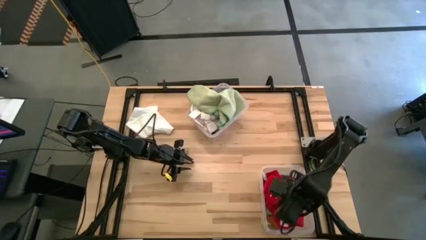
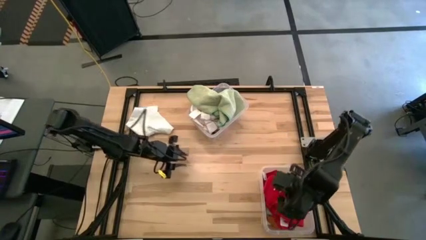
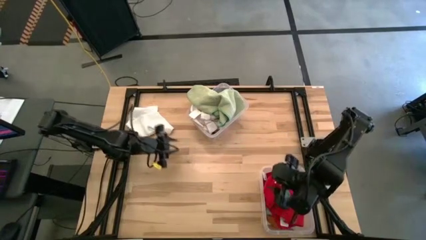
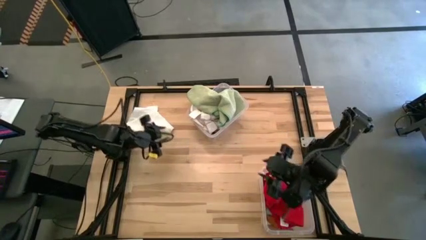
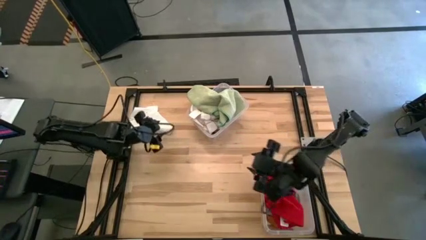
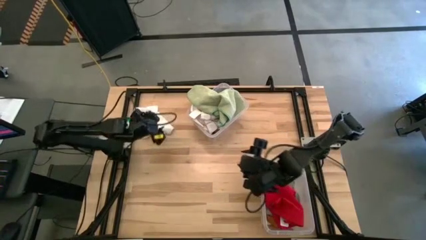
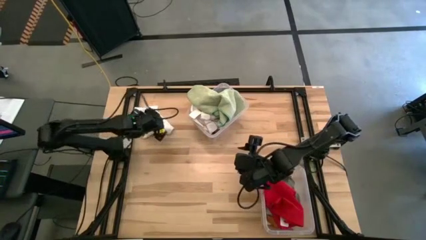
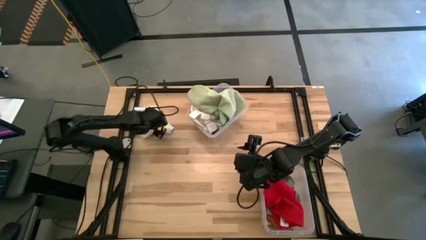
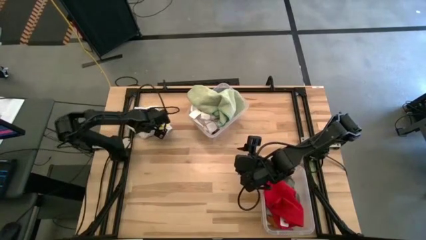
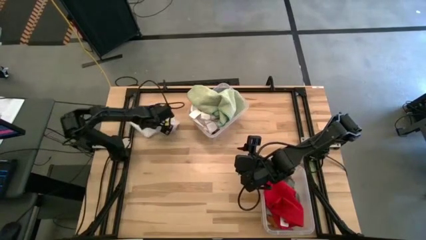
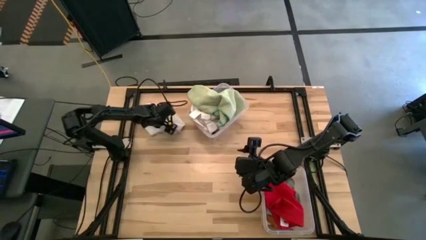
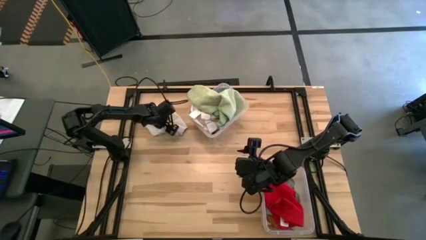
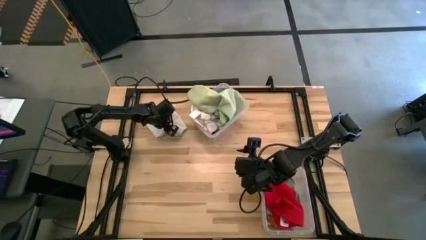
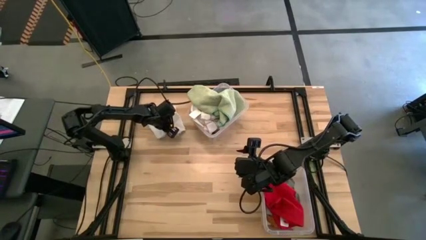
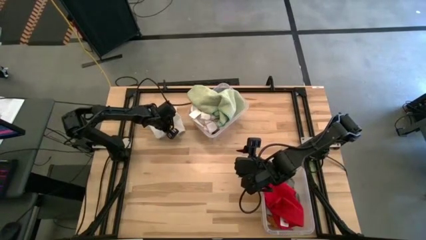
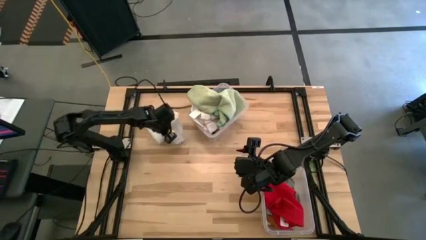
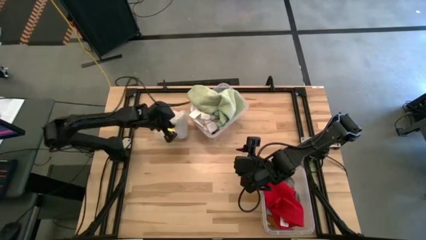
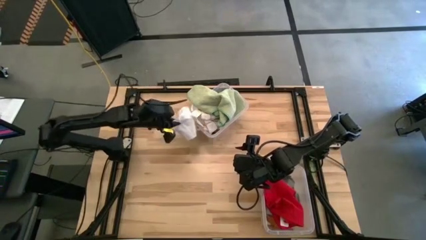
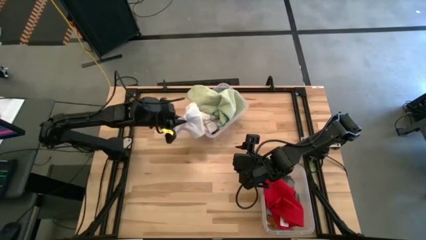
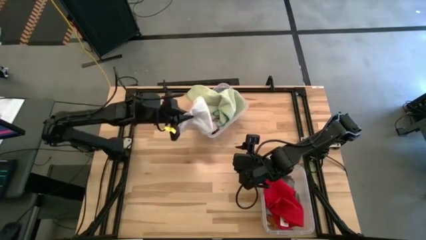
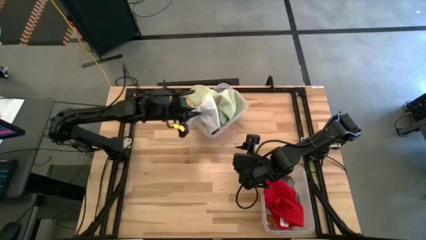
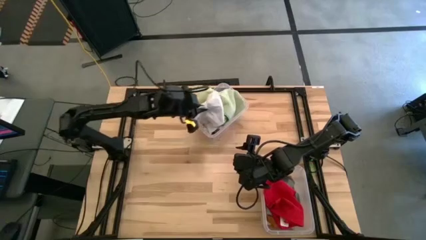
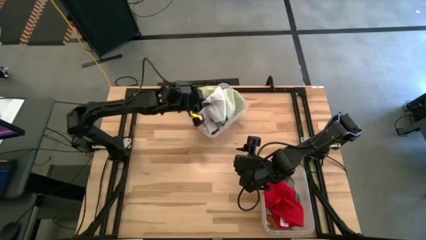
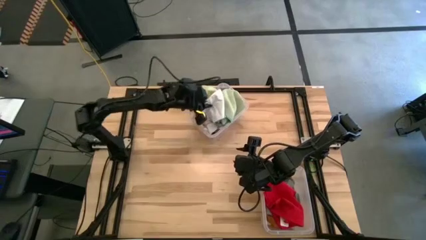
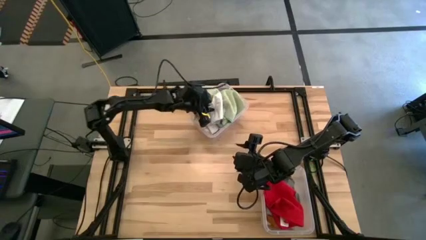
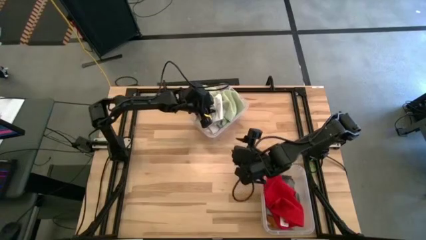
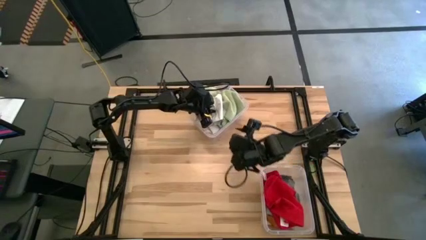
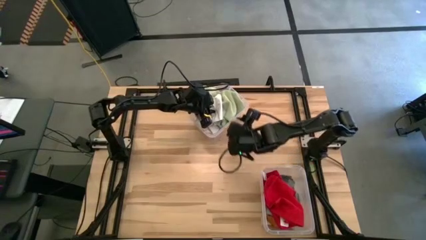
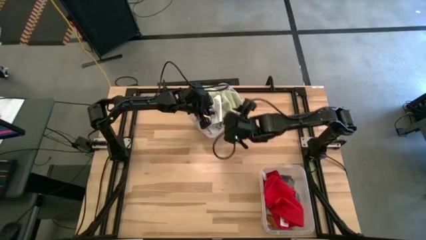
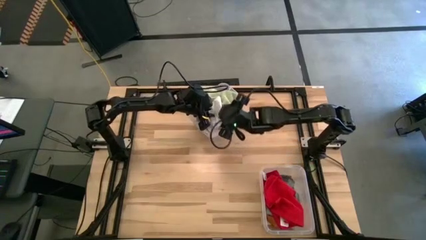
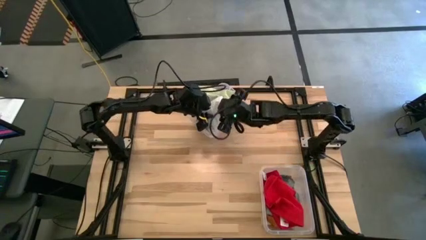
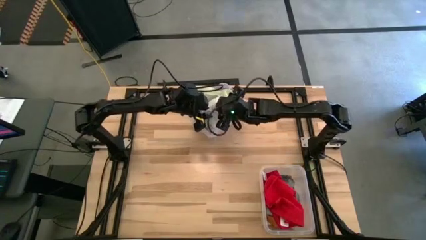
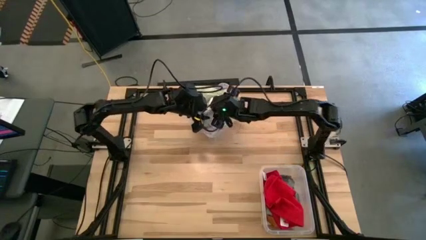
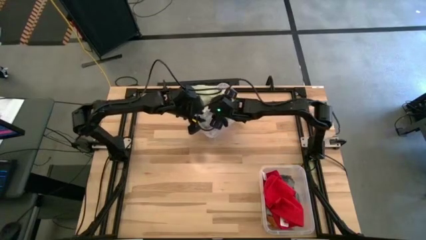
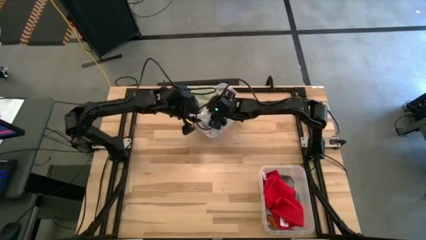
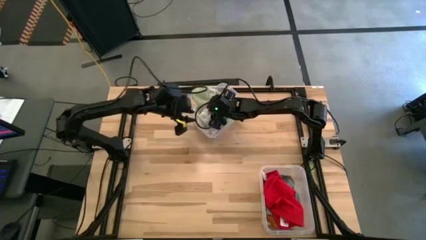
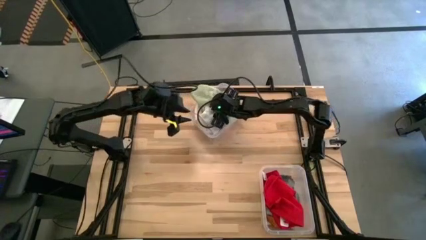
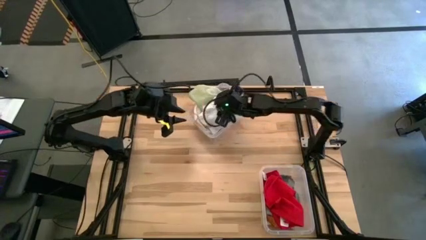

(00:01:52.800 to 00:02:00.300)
Task: Sort towels by color in basket
Put the white towel into the top transparent bin

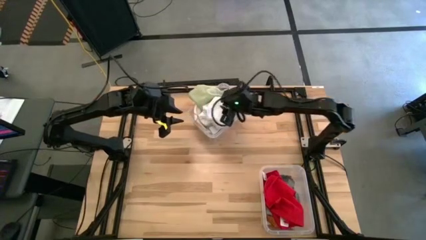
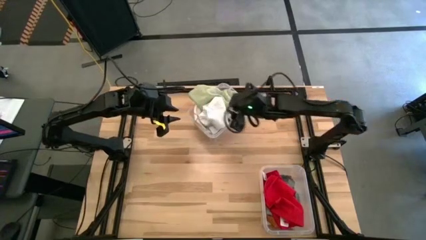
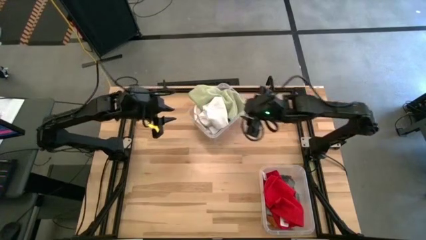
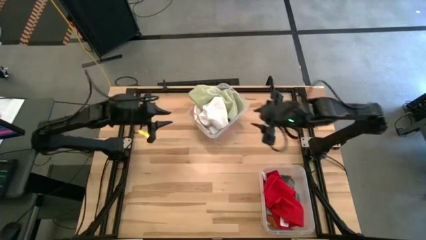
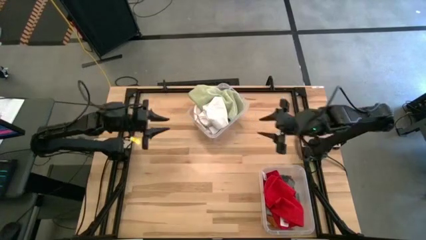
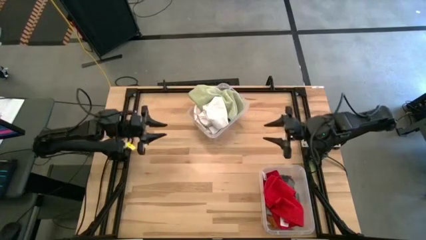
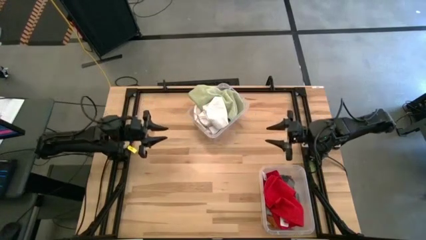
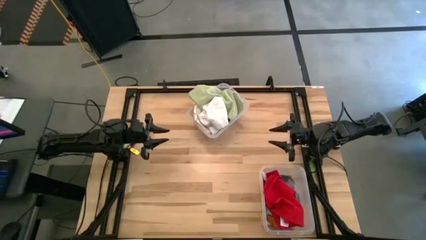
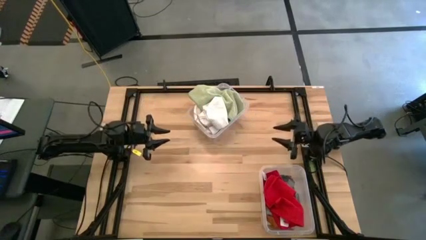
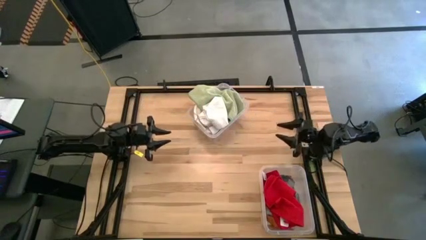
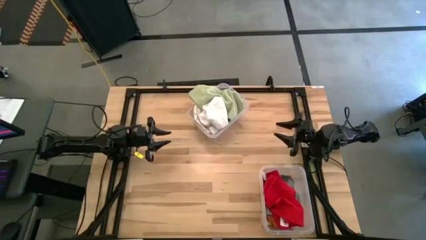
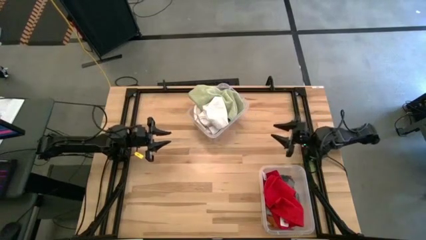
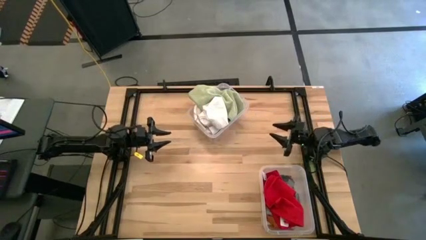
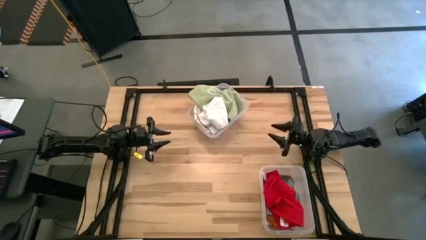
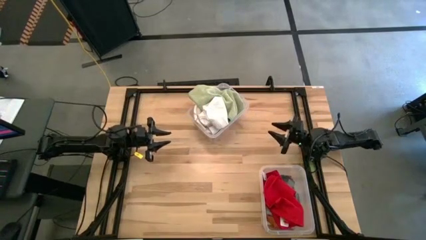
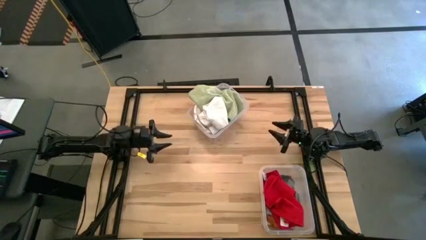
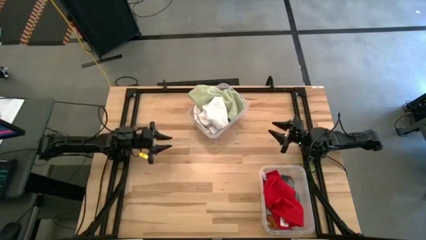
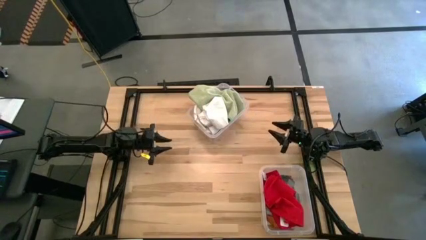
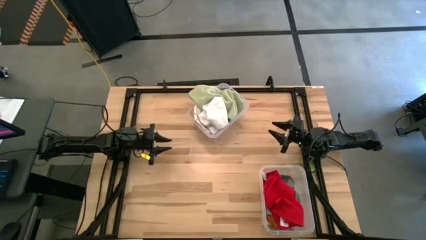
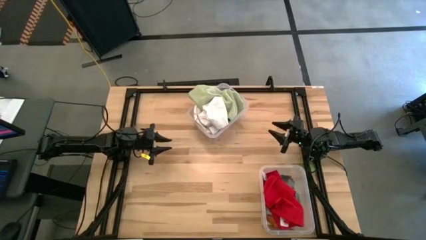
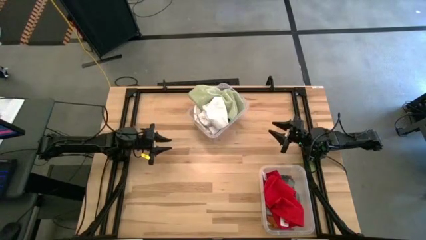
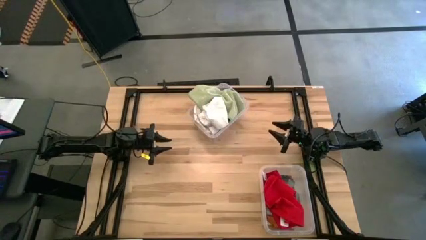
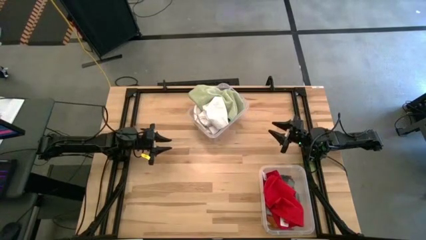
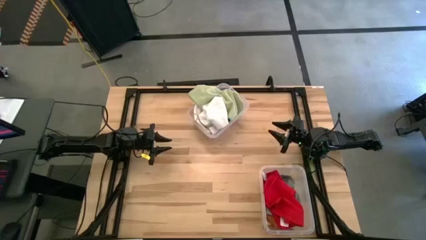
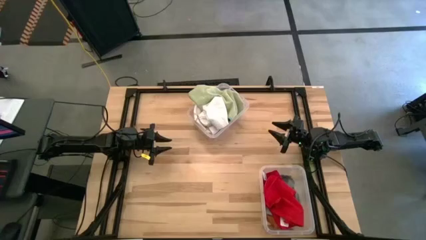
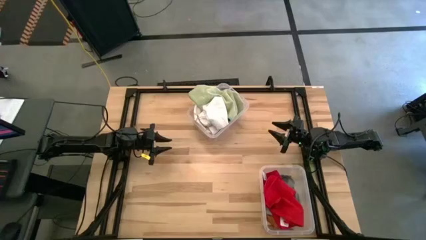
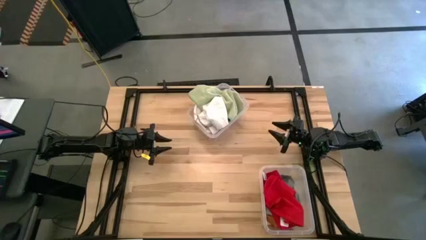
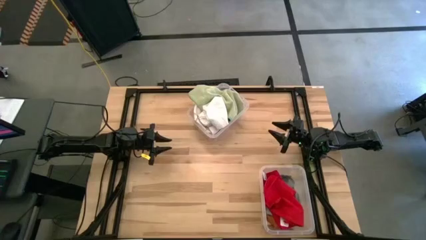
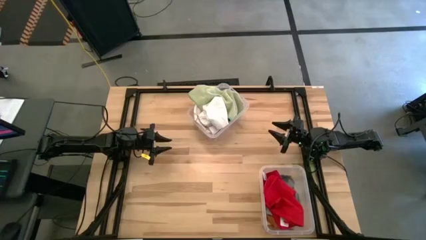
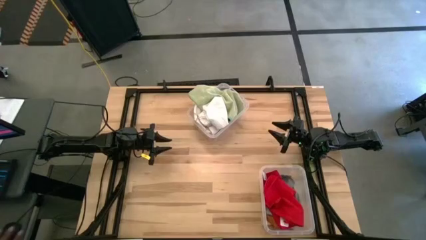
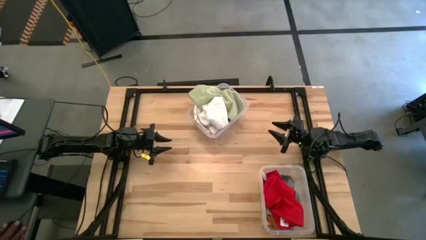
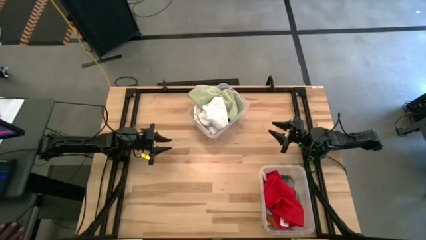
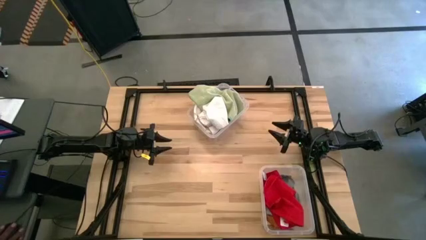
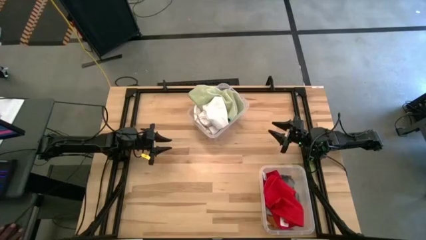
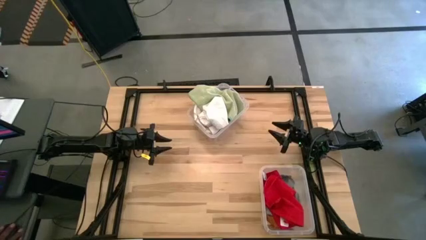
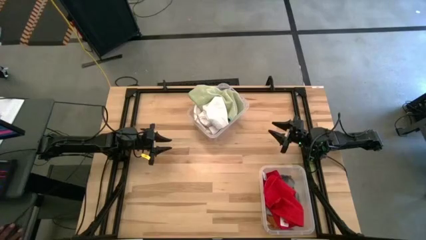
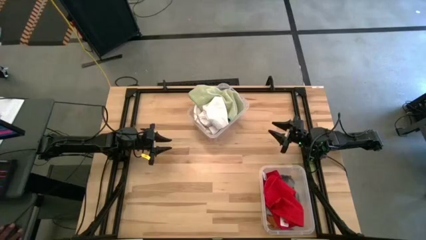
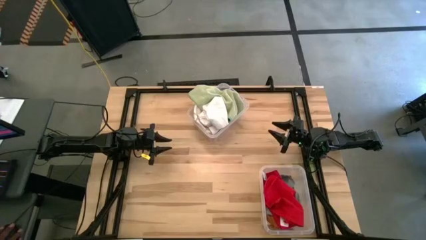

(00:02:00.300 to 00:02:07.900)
Return to Home Position

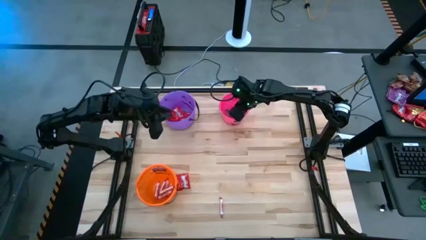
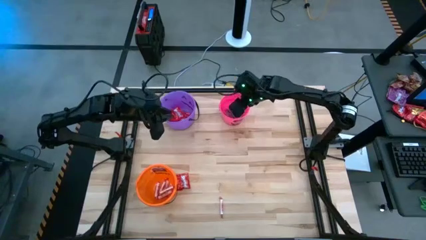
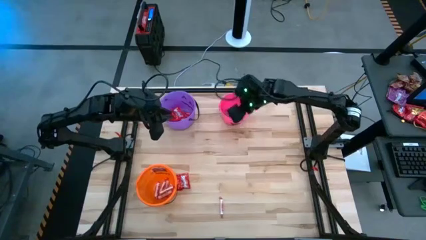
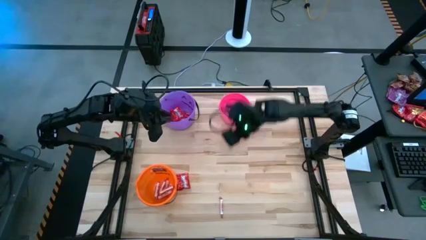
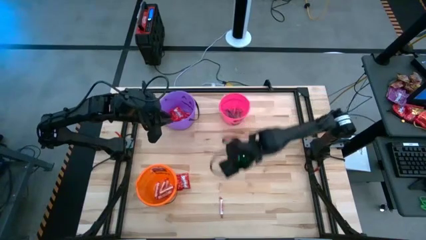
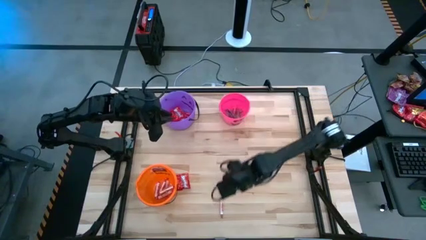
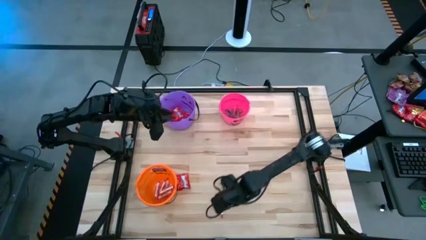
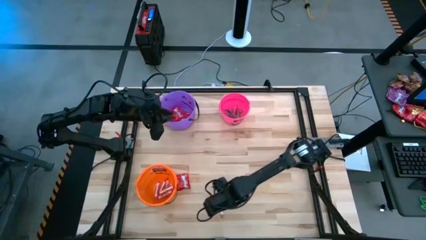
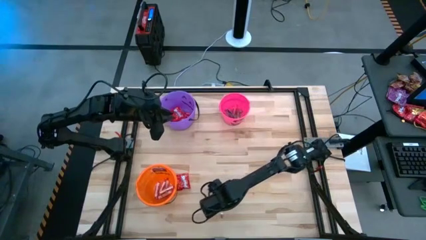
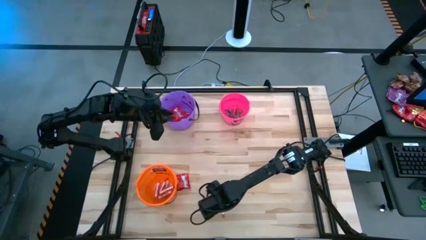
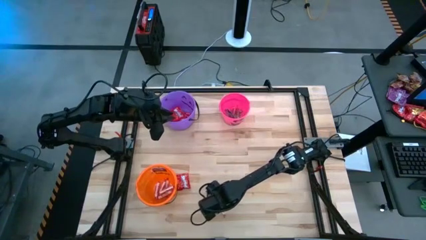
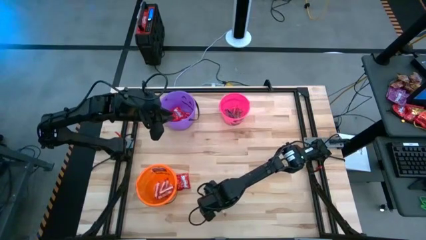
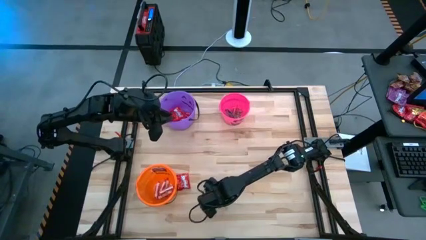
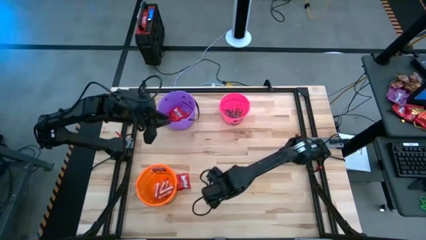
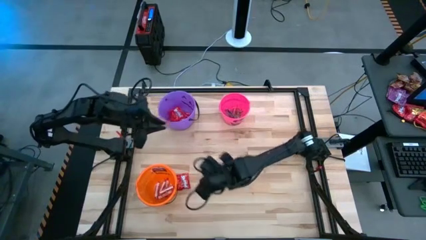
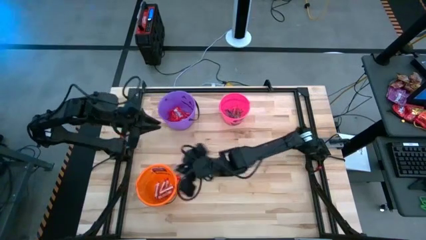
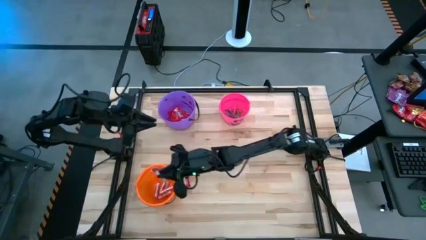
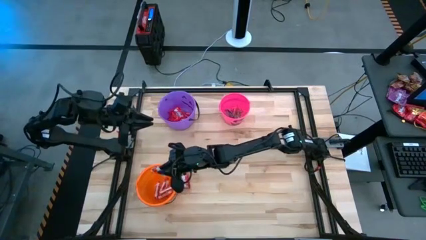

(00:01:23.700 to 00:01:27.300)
Task: Sort candy by brand, put in halloween buckets
Put the white candy into the orange bucket
